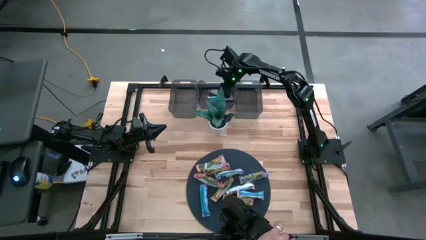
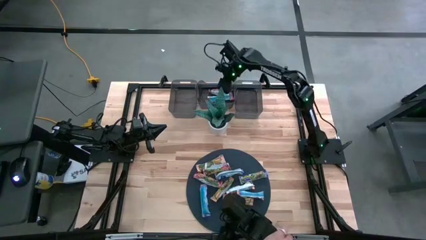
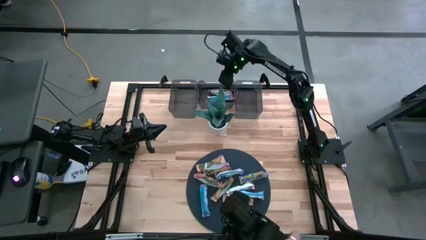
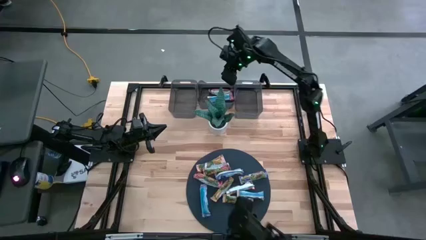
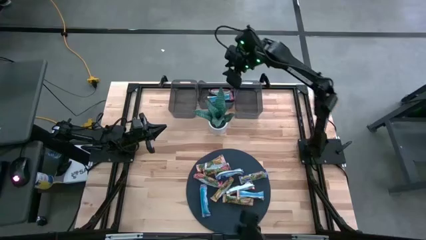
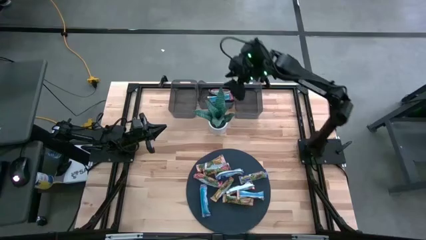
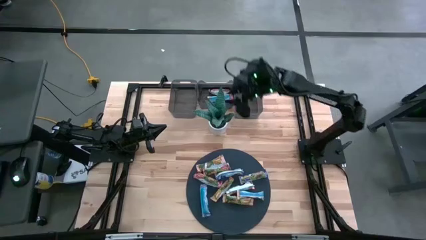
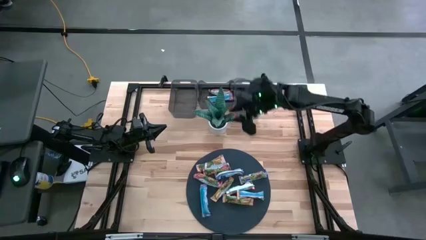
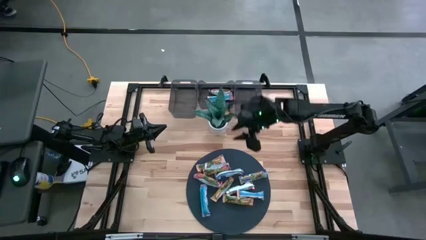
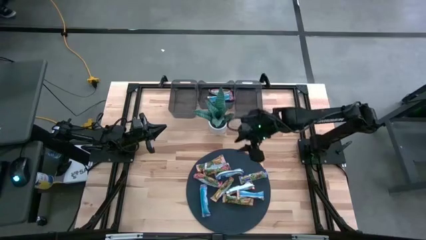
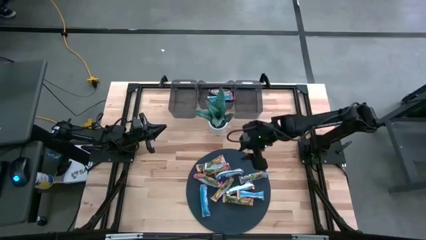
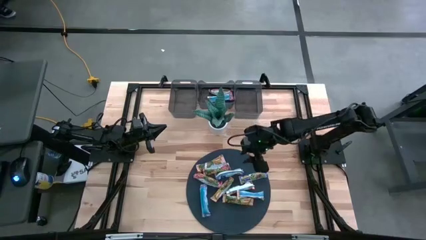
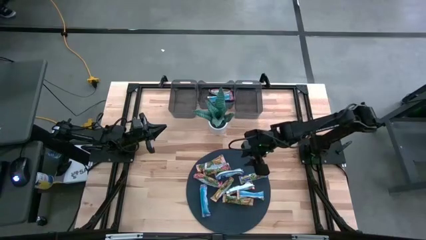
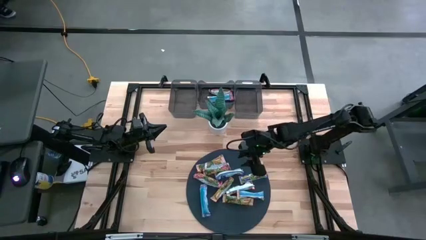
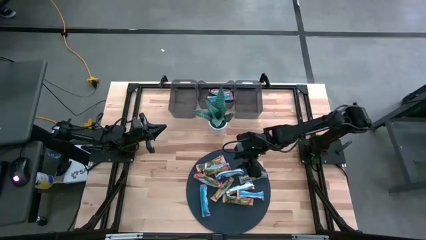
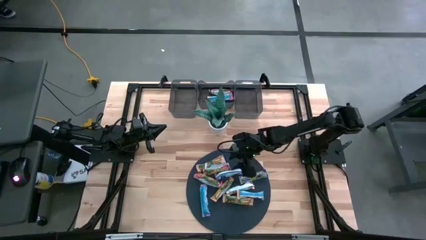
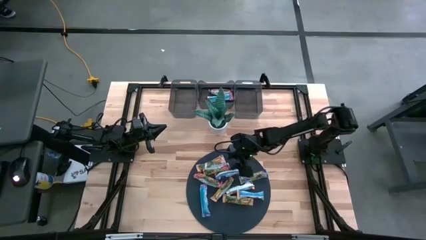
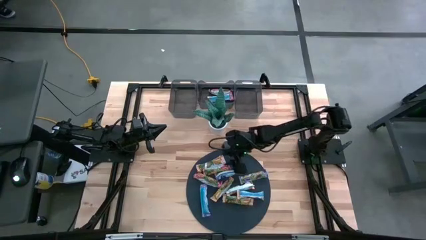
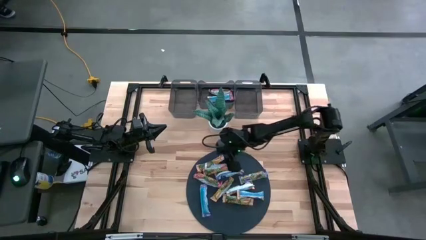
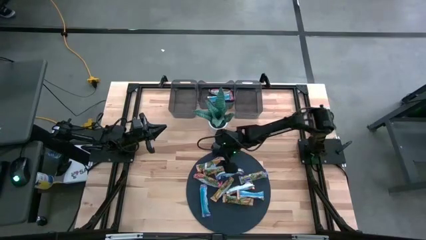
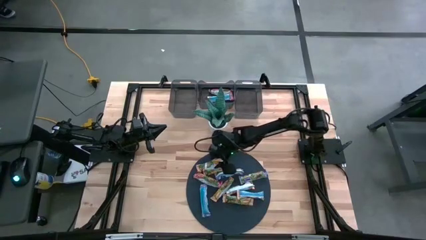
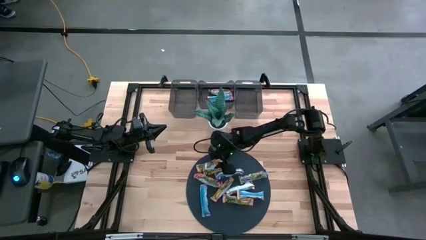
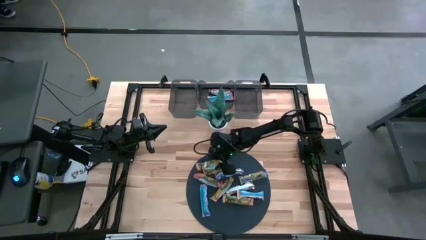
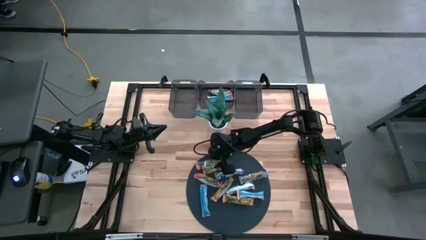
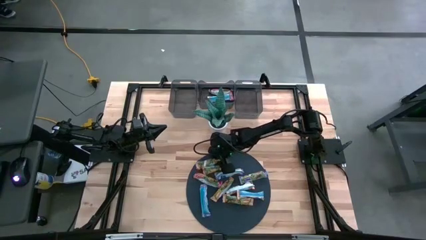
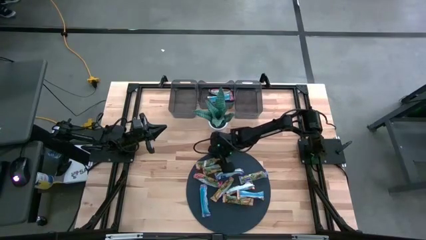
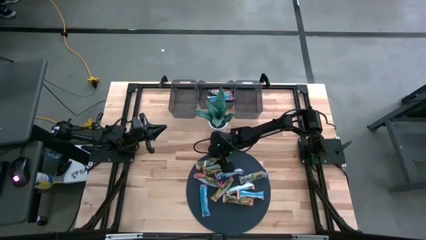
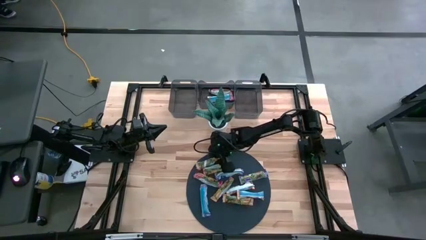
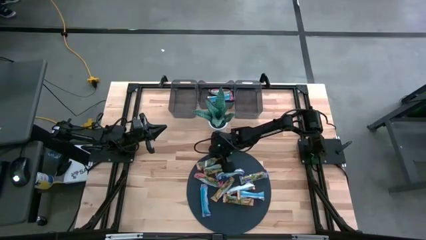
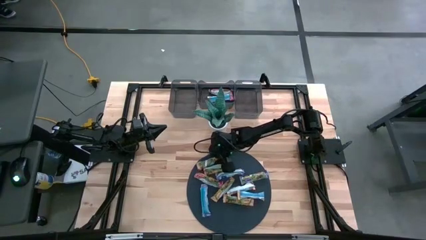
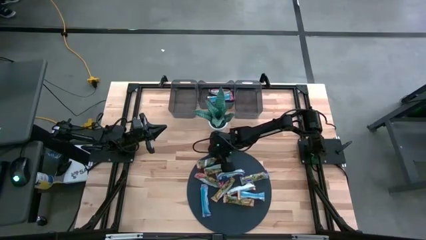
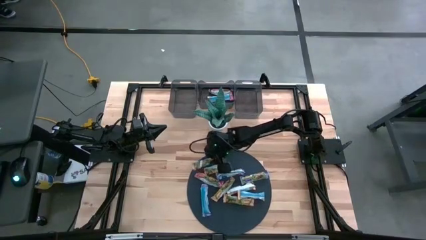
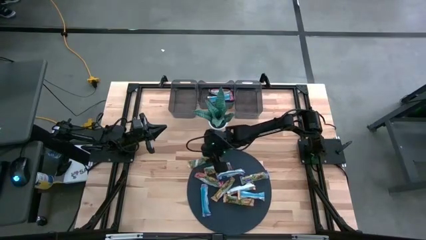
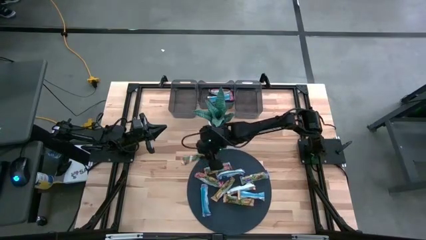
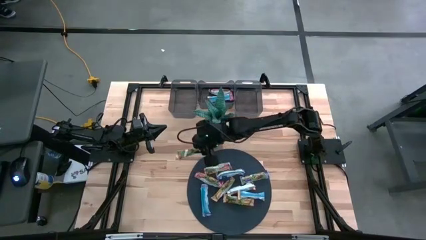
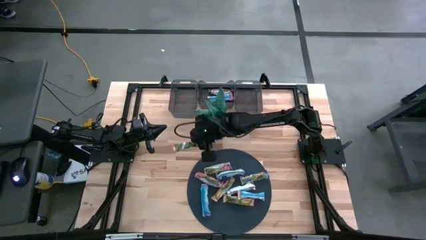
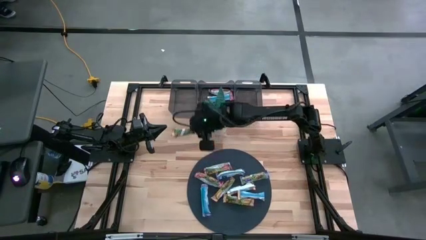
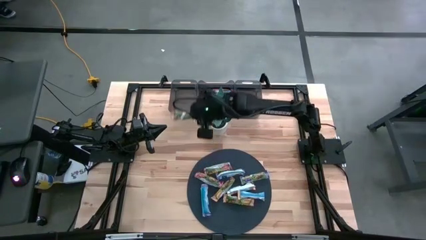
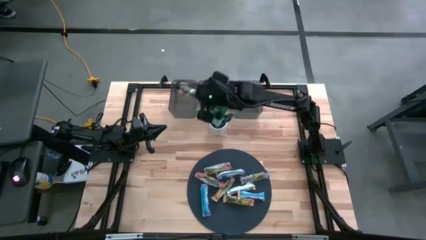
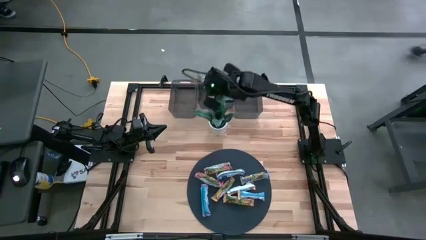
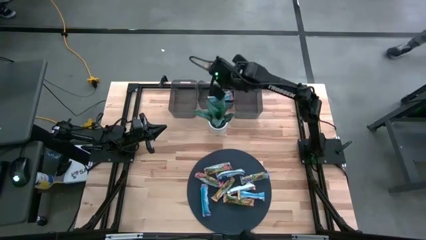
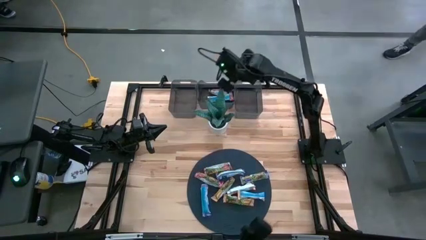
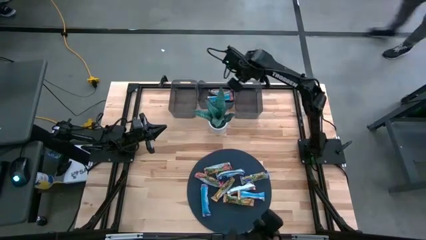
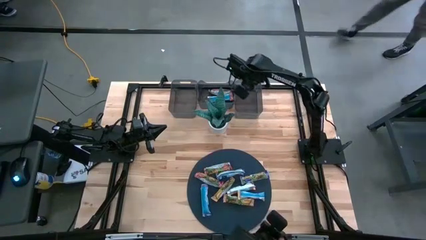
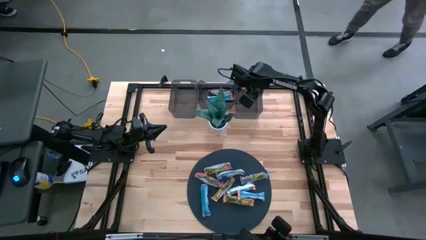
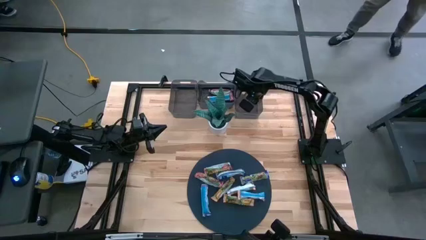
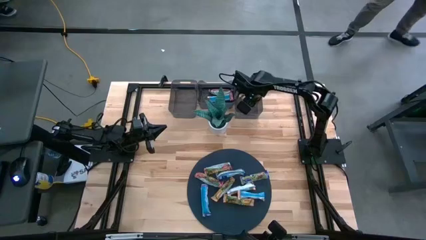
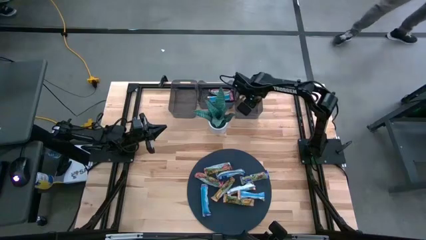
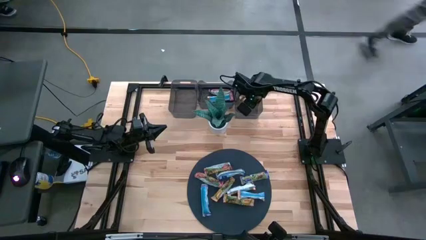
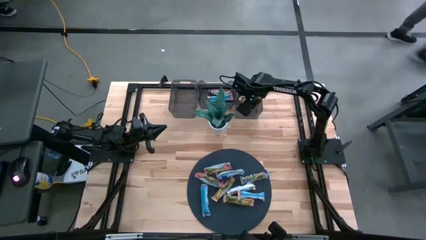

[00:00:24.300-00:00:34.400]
Task: Pick and place Granola Bars by type
Put the orange granola bar into the right black bin

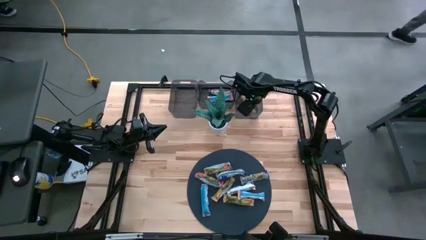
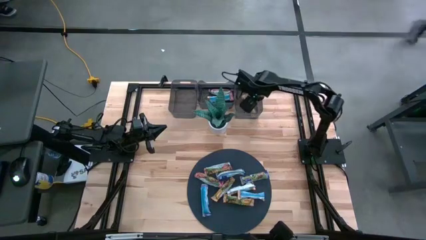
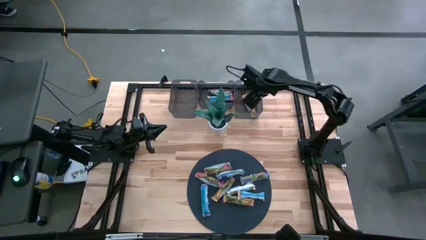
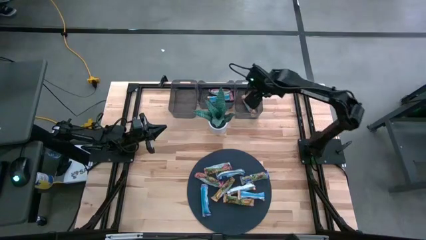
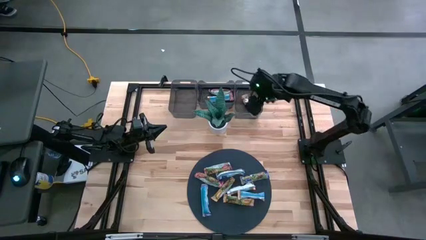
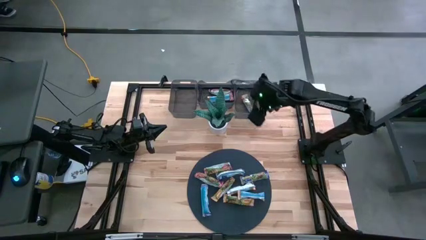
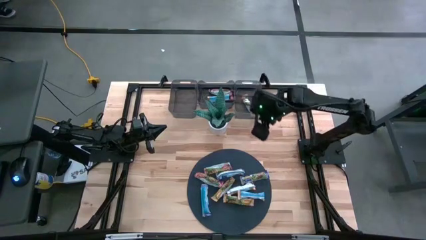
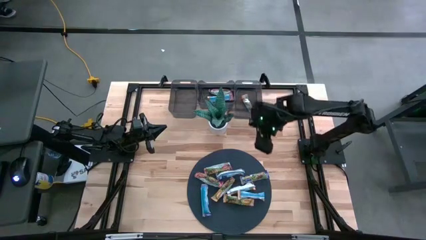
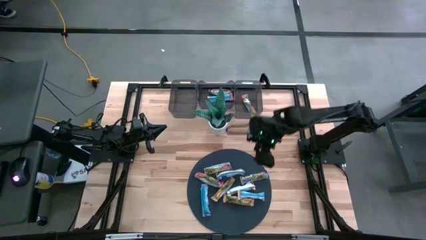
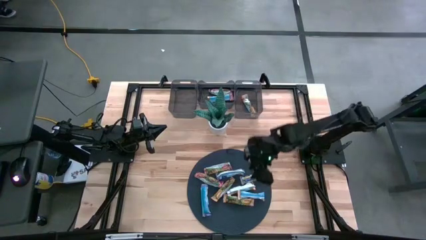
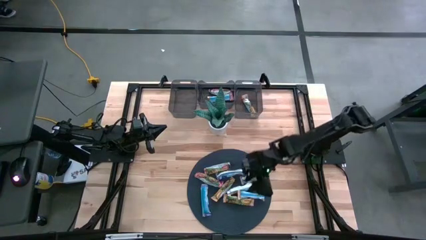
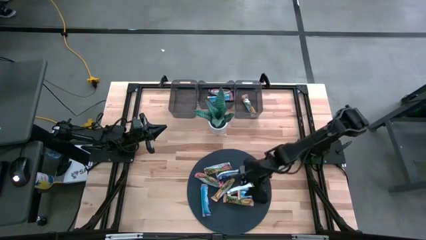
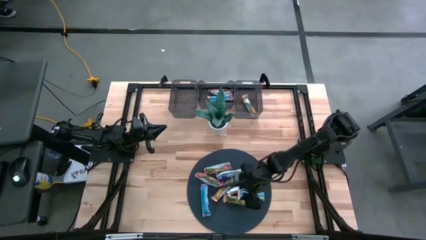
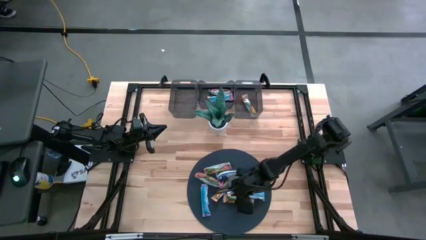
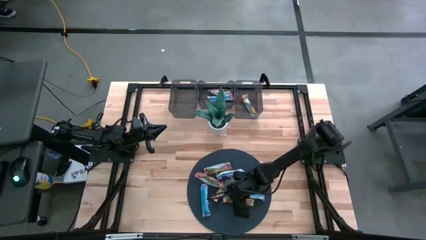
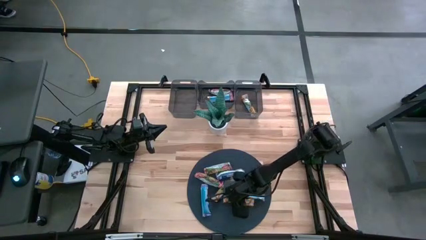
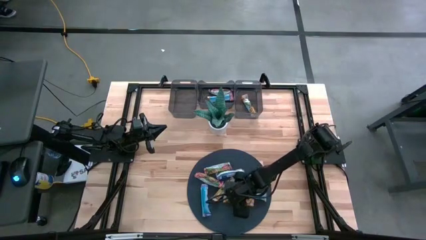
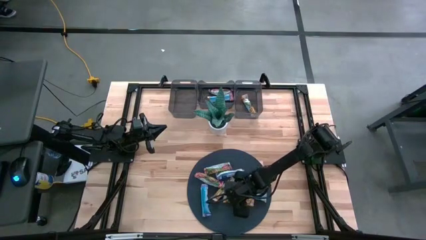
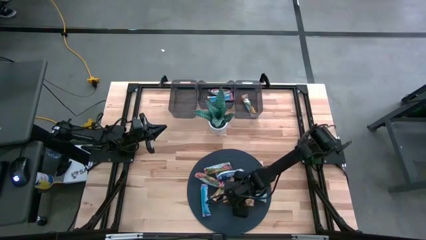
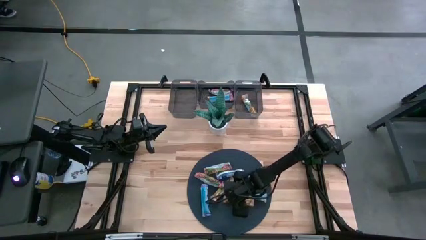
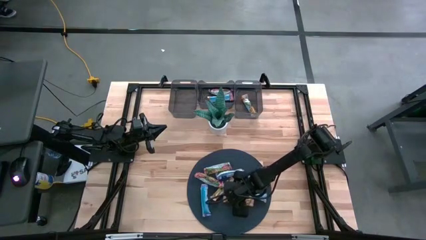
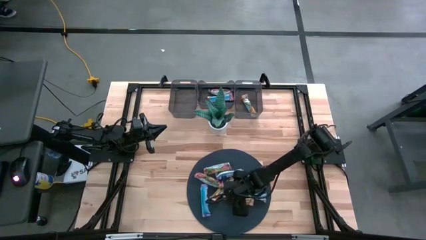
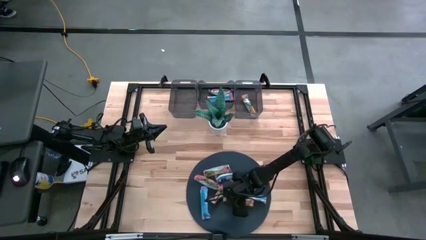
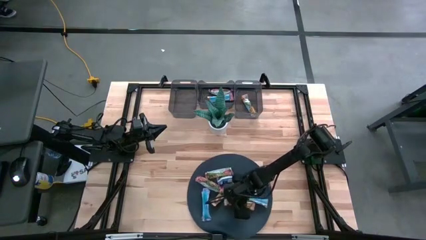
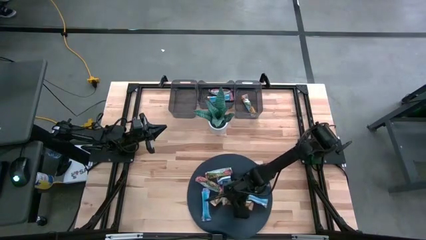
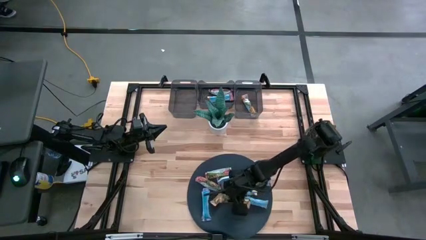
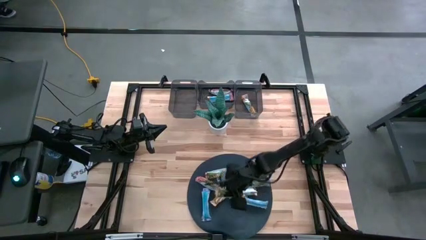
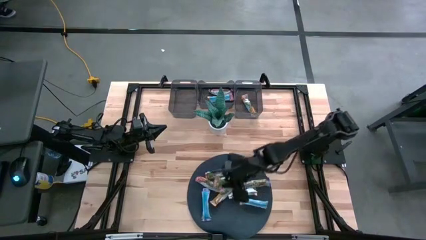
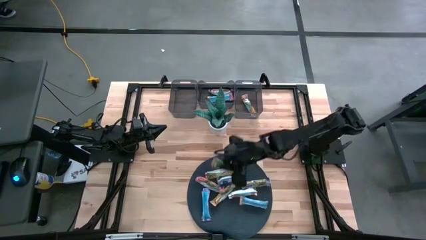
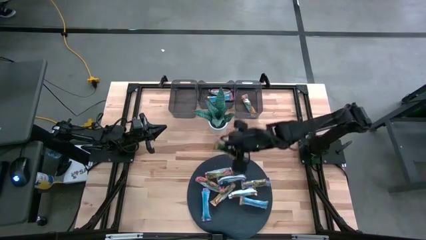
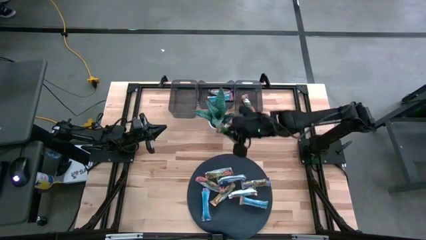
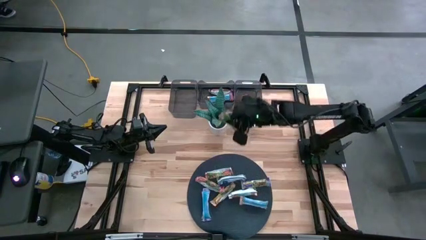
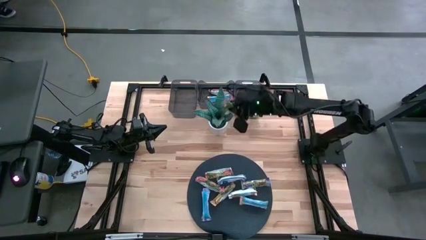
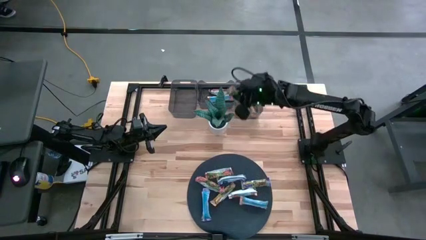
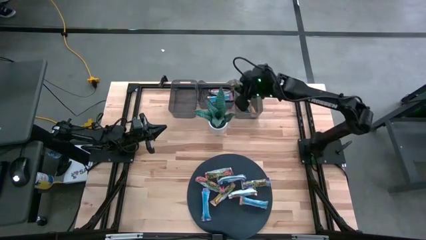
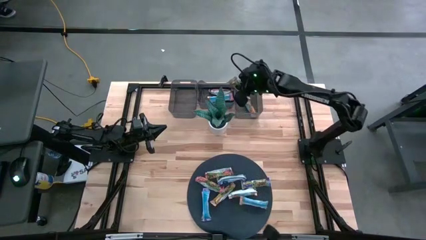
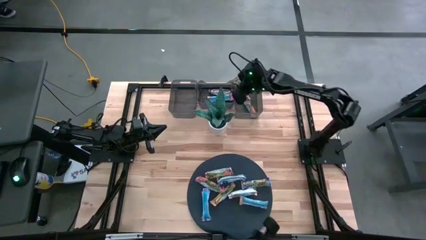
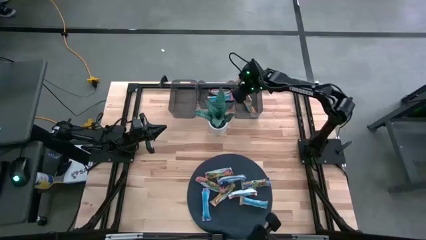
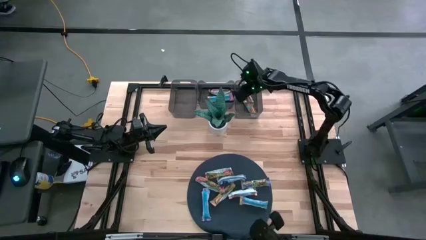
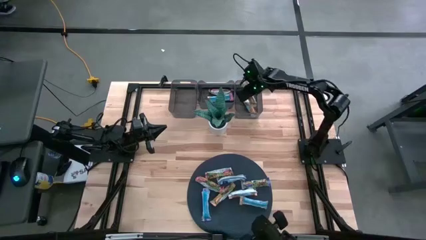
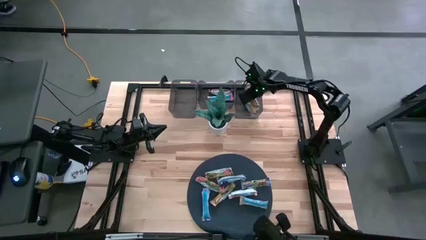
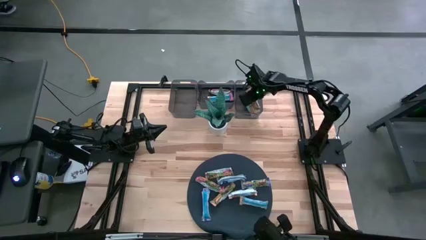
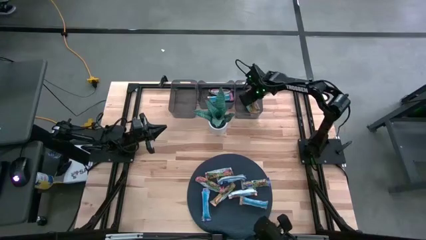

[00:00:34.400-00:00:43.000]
Put the orange granola bar into the right black bin
